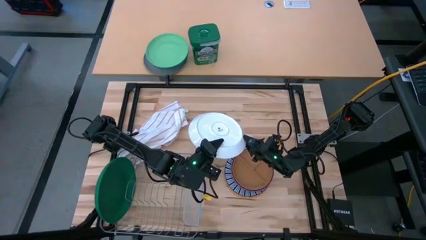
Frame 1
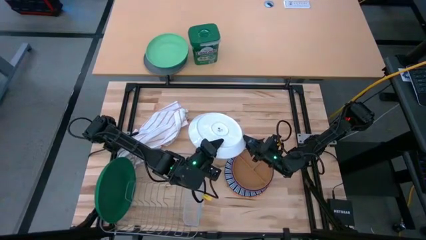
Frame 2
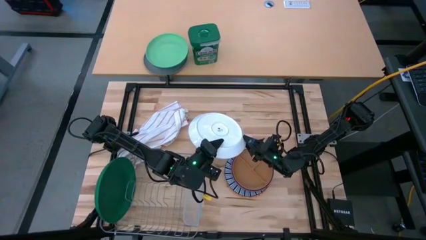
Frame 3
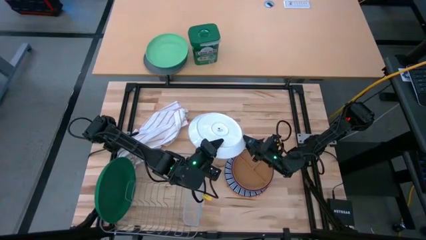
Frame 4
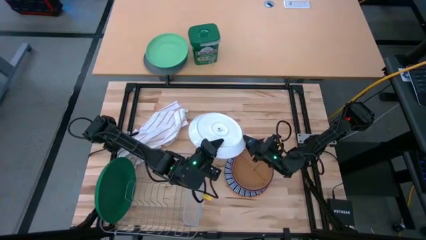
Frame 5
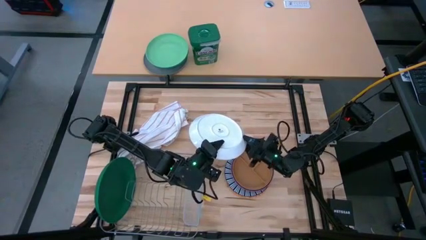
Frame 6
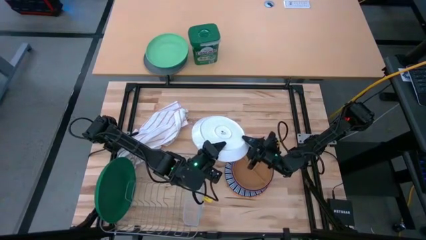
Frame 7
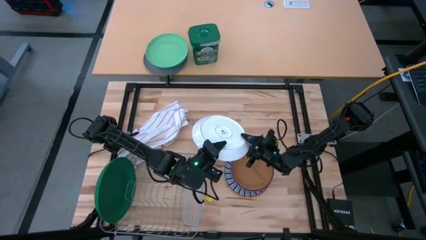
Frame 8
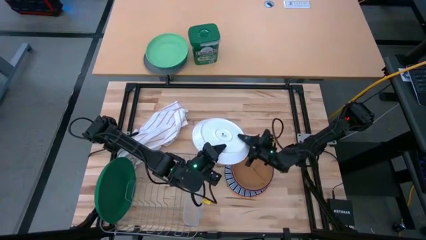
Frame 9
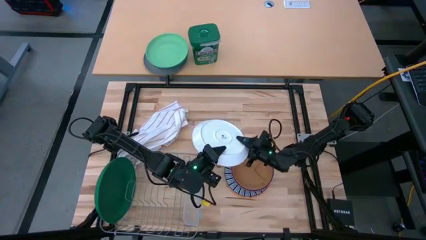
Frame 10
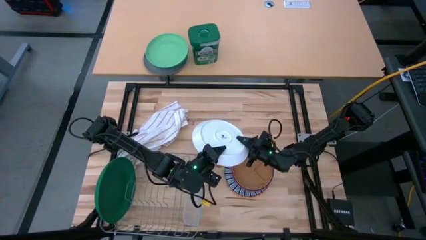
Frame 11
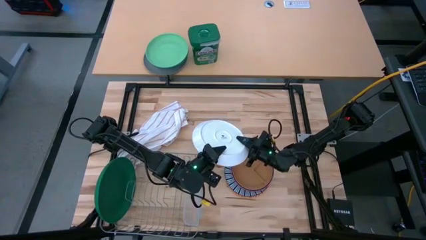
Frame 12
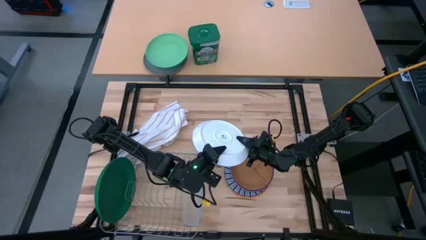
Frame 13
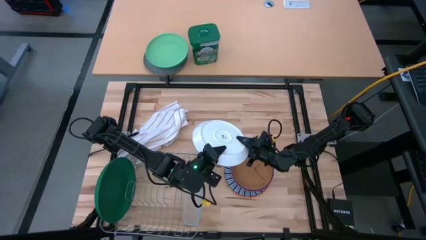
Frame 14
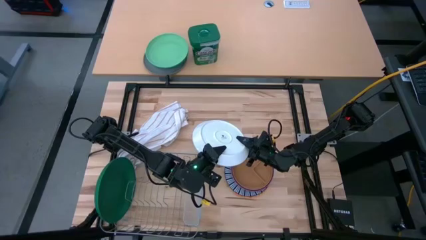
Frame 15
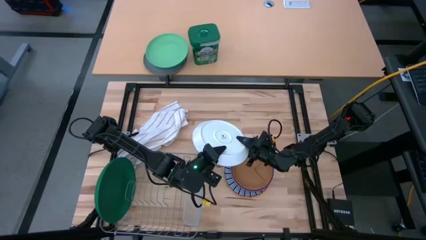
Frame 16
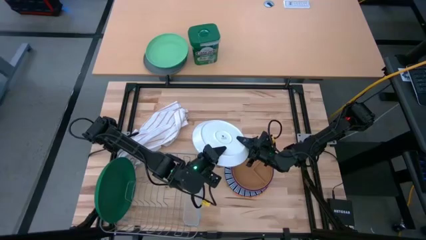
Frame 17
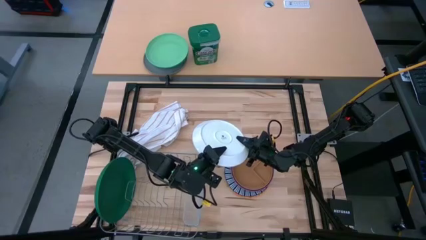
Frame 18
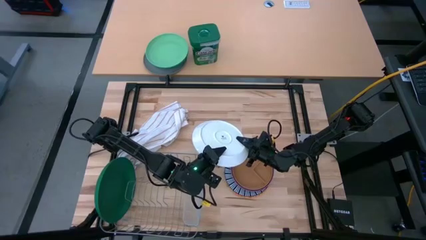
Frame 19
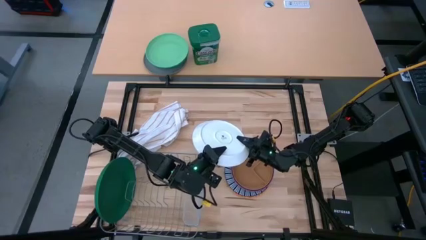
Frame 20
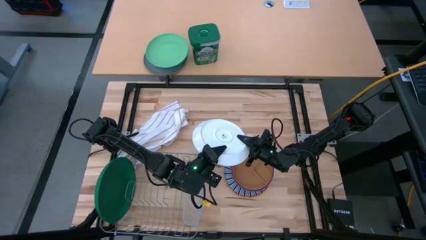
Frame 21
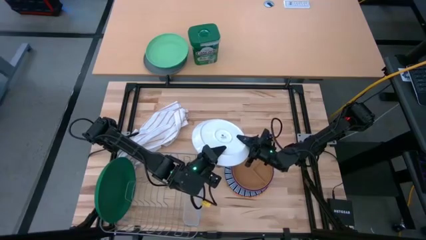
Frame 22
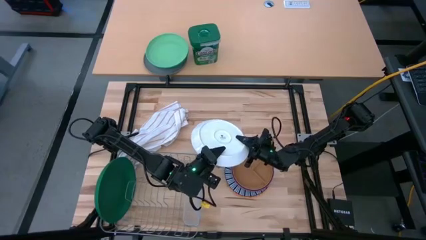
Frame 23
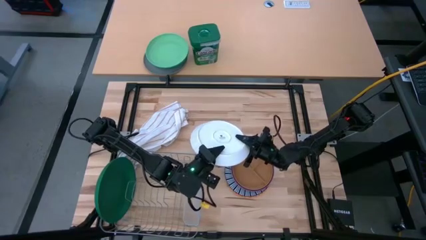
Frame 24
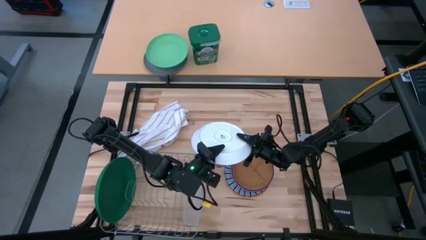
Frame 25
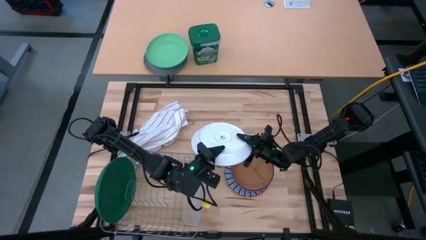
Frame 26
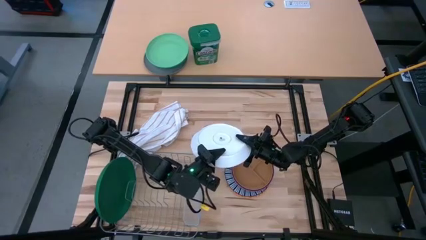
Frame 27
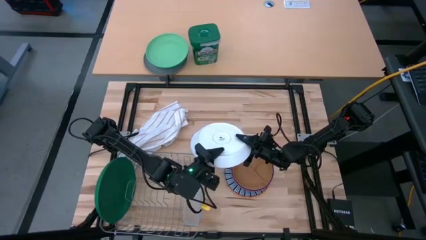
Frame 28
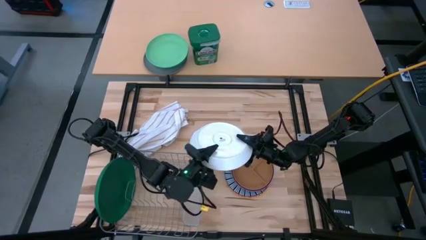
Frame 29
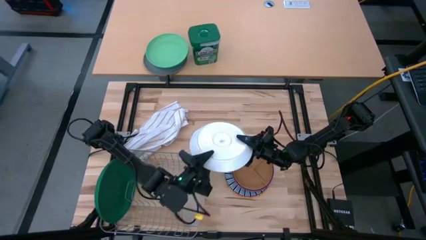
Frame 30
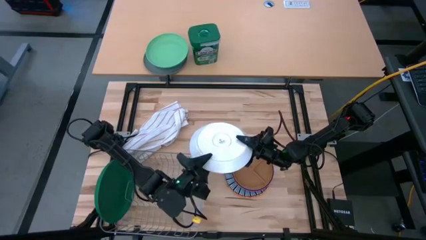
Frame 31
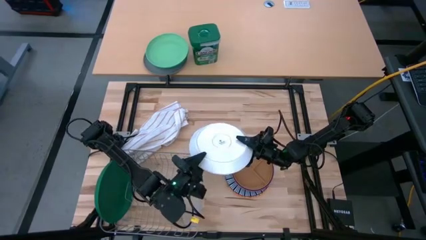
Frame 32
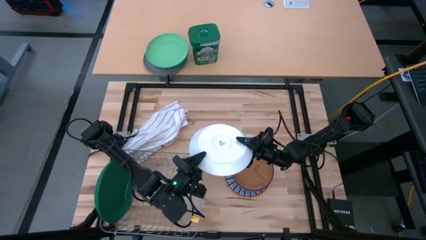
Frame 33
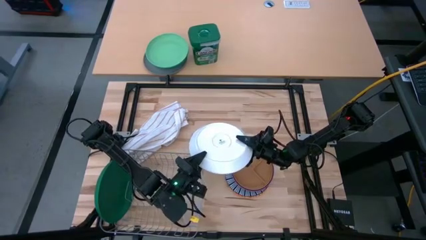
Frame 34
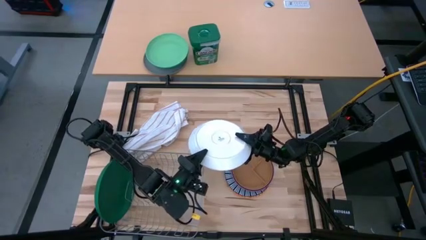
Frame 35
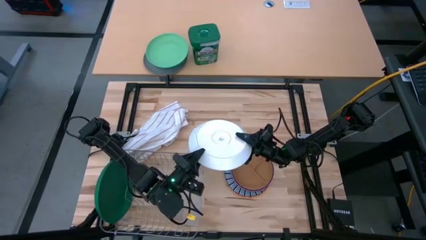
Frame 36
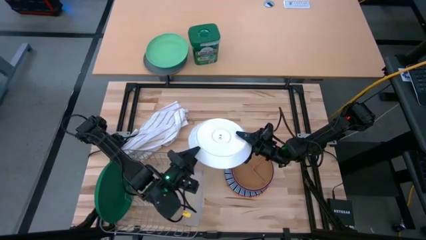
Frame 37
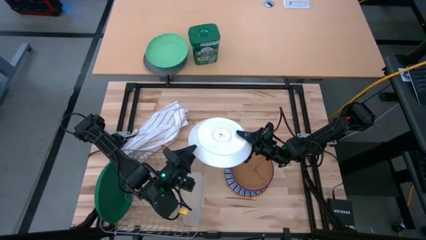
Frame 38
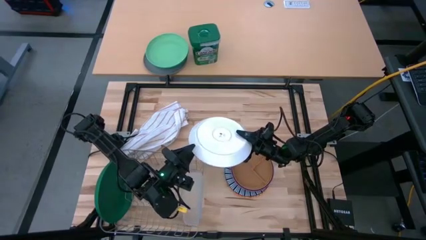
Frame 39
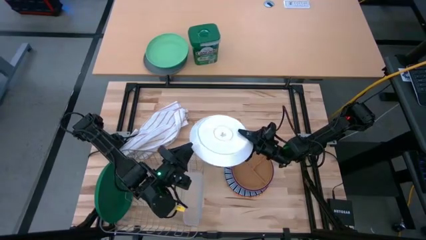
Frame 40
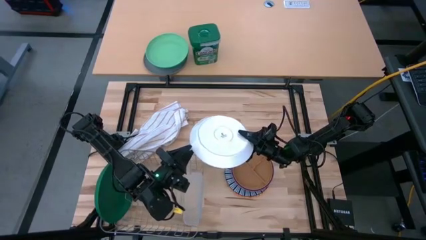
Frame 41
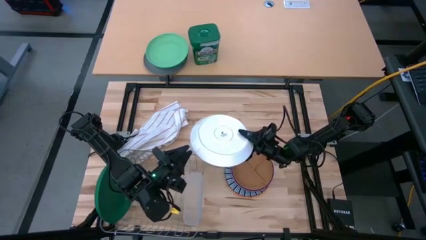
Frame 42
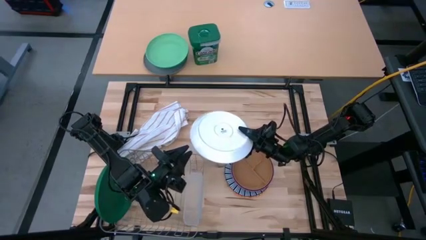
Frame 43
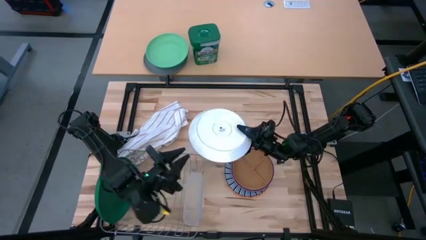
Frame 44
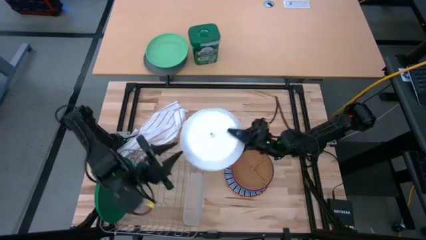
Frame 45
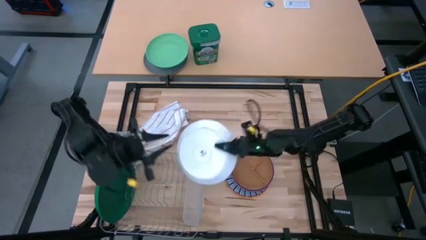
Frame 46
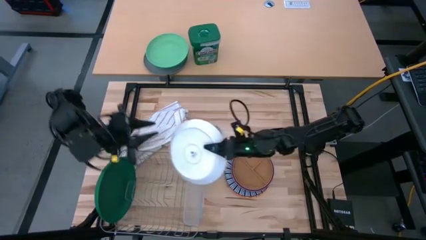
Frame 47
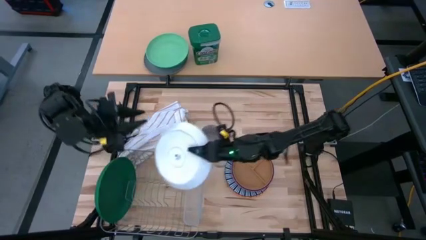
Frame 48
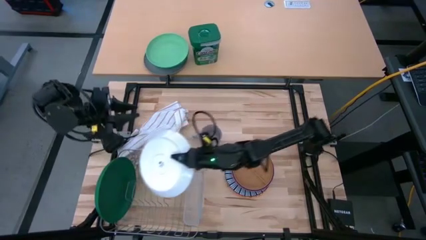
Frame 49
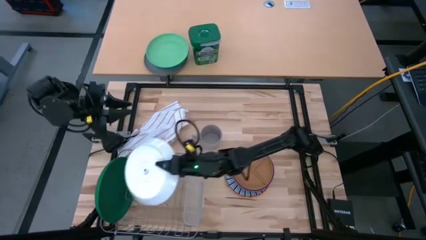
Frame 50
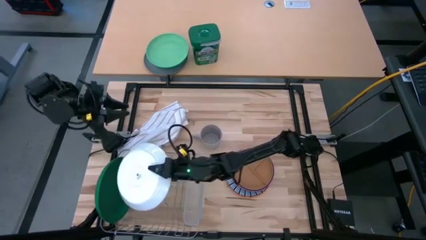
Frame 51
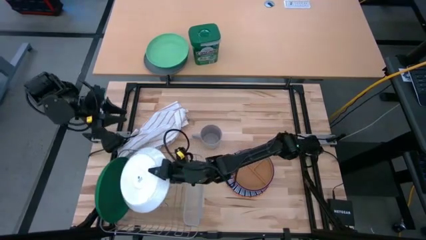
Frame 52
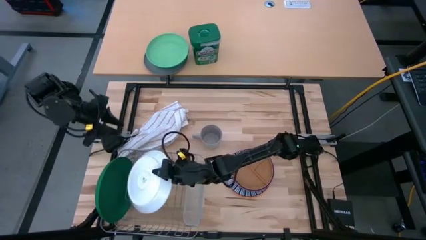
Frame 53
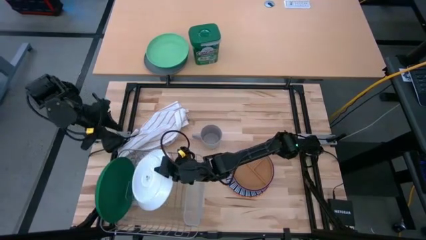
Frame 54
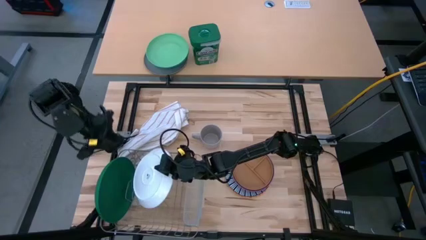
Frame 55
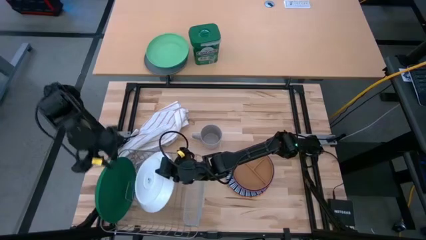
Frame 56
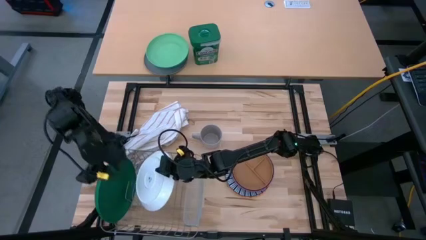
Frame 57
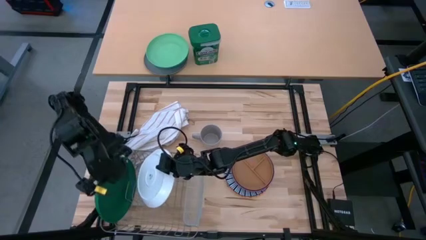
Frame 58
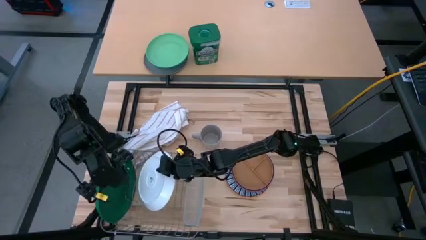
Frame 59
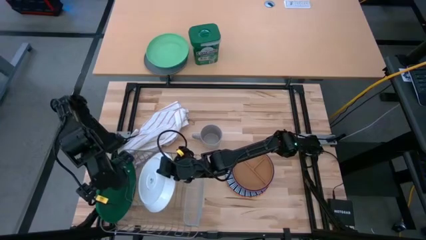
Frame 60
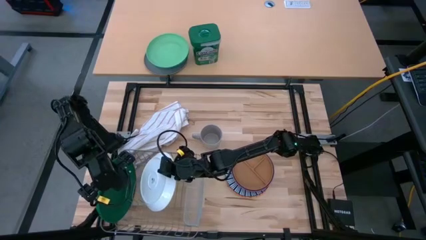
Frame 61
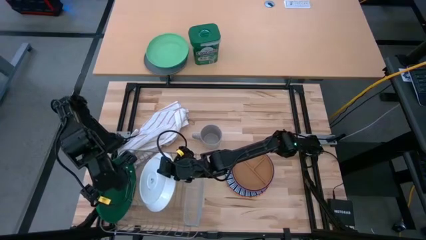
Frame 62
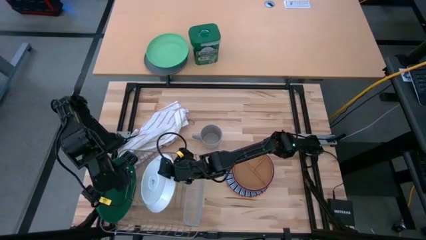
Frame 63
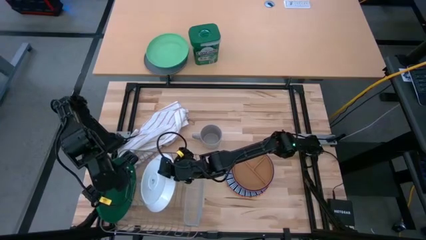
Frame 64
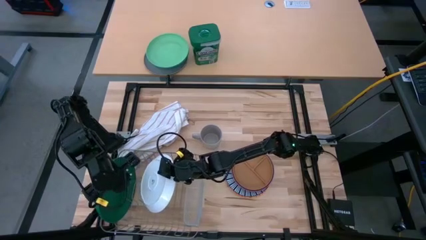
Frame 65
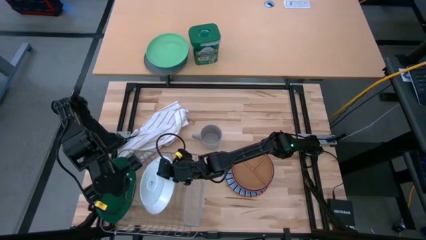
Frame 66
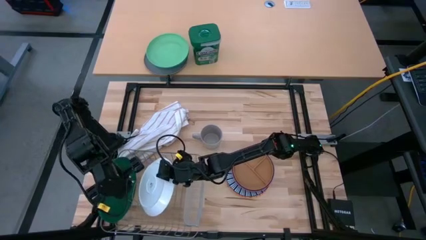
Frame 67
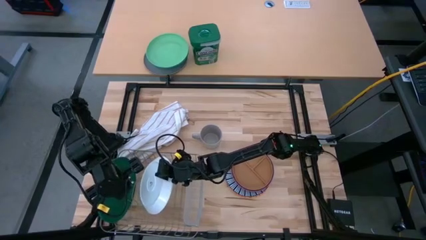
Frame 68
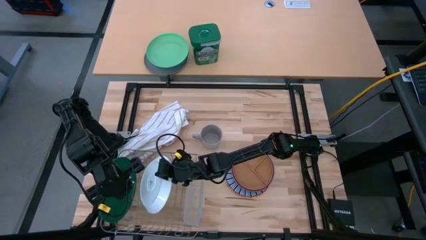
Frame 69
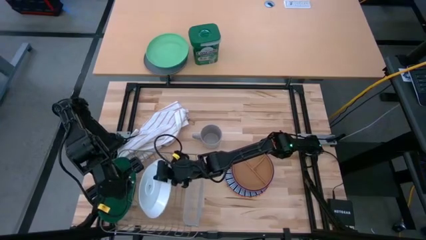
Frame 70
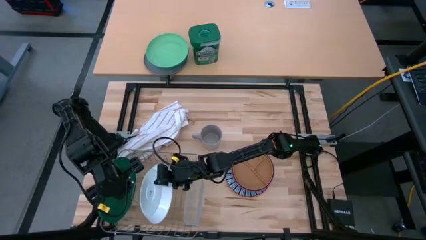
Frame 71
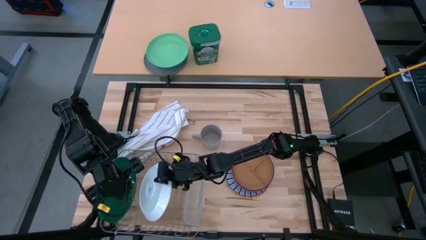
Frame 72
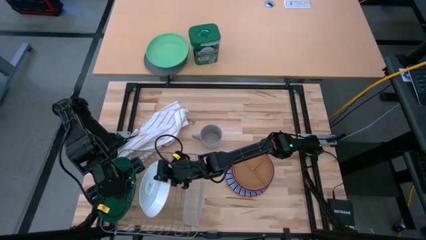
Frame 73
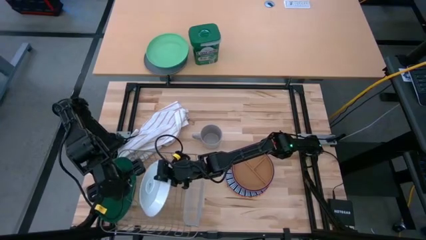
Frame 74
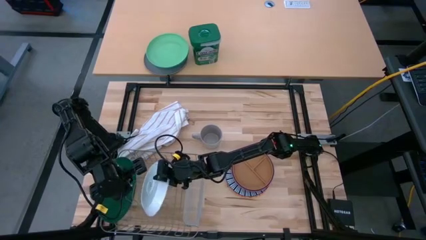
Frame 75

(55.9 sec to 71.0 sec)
Task: Sort dishes
Put the white plate into the dish rack
